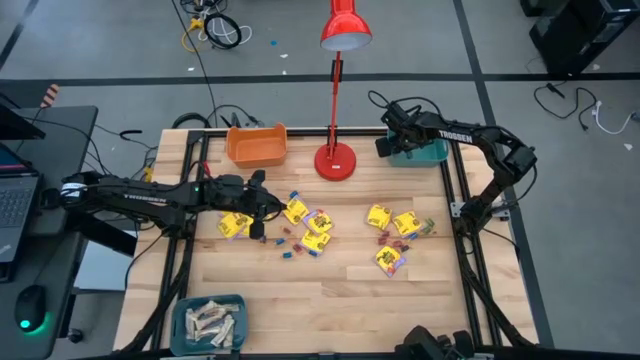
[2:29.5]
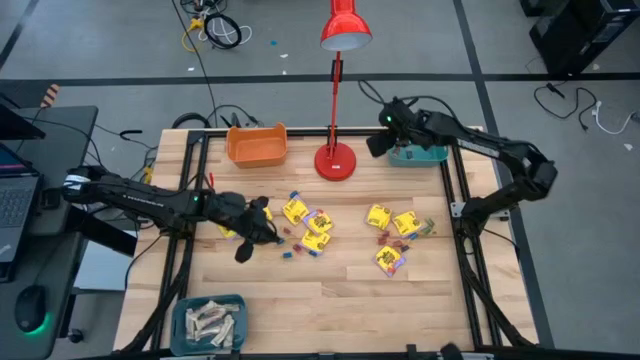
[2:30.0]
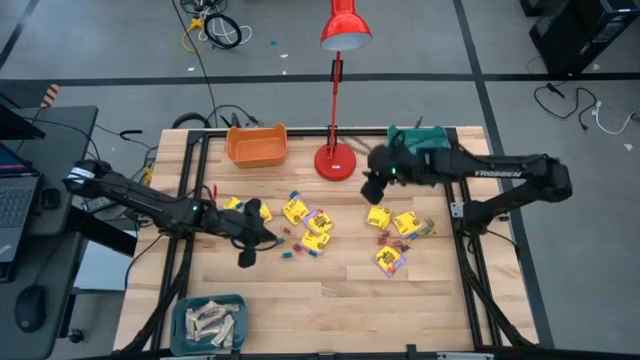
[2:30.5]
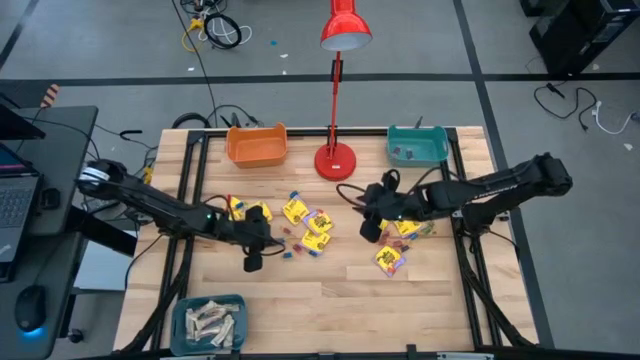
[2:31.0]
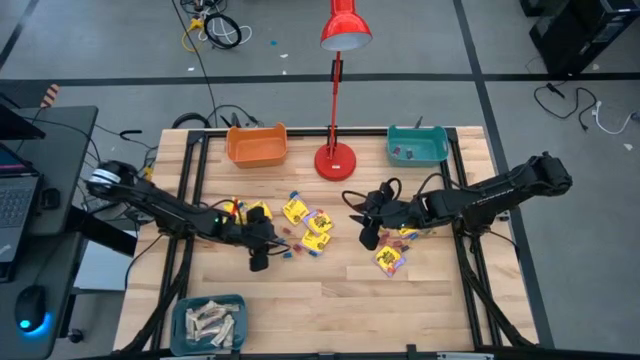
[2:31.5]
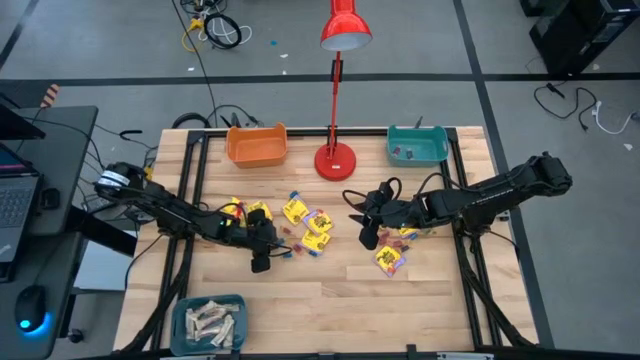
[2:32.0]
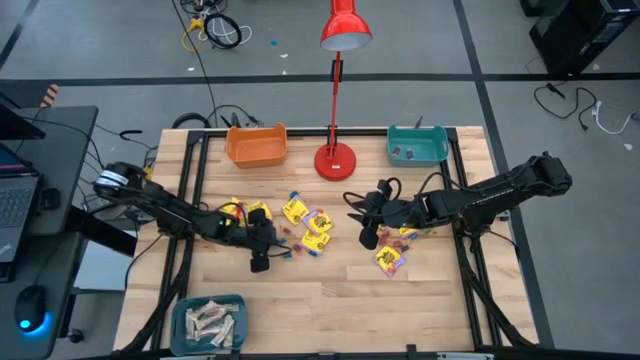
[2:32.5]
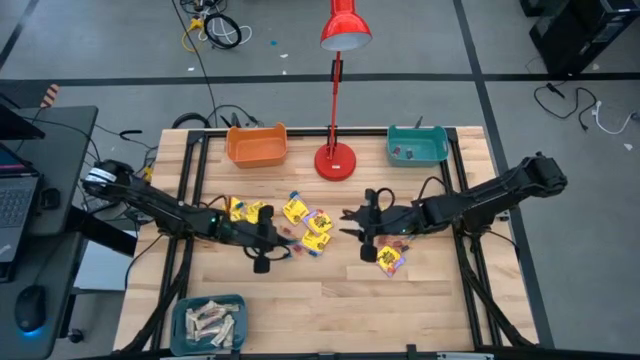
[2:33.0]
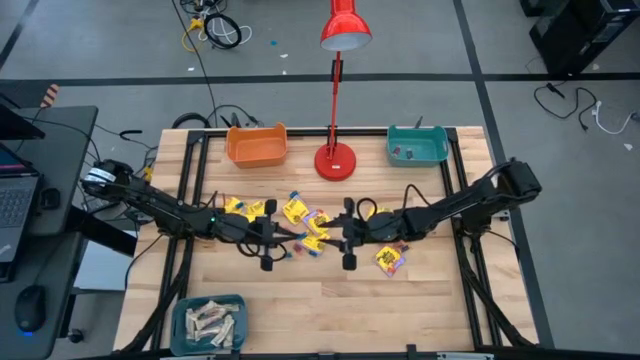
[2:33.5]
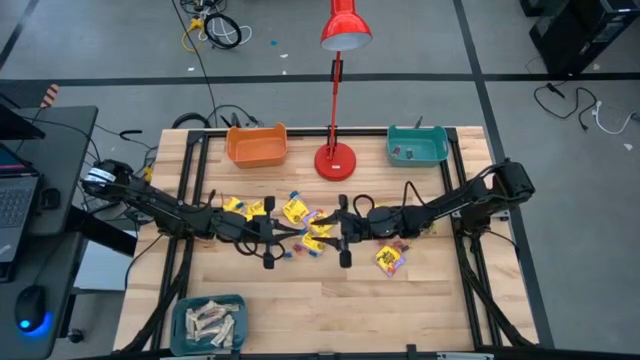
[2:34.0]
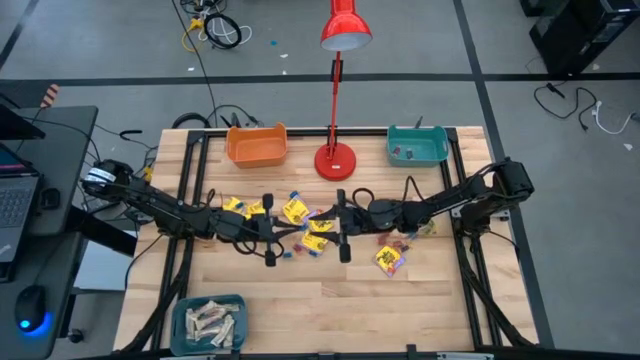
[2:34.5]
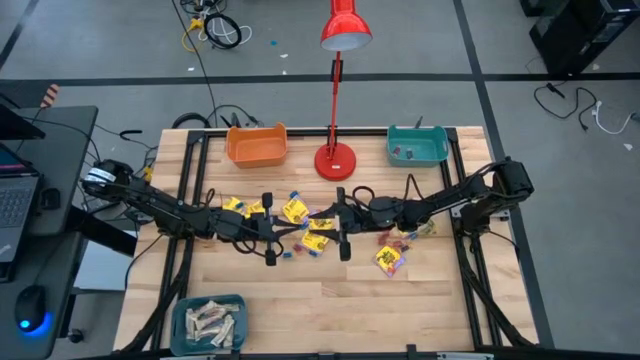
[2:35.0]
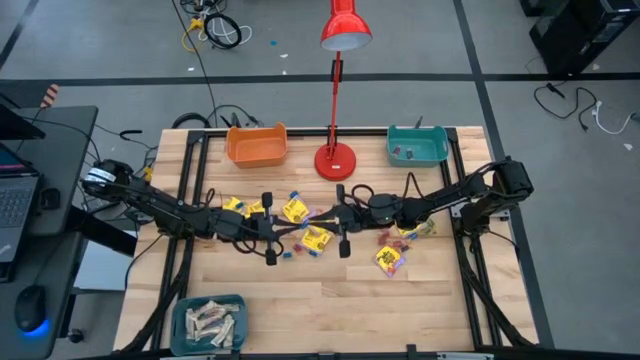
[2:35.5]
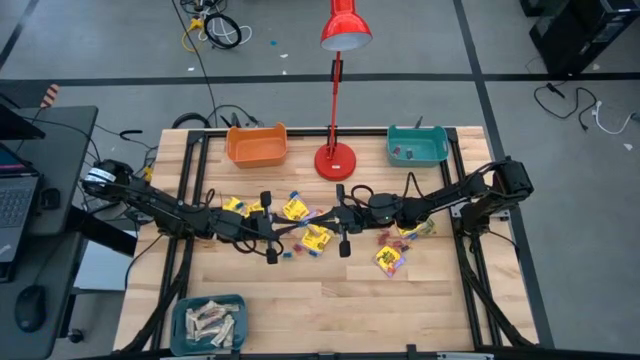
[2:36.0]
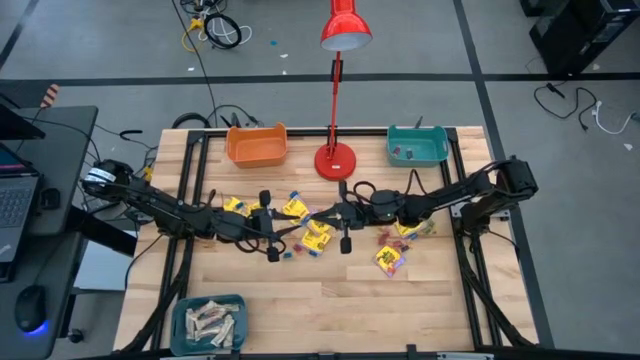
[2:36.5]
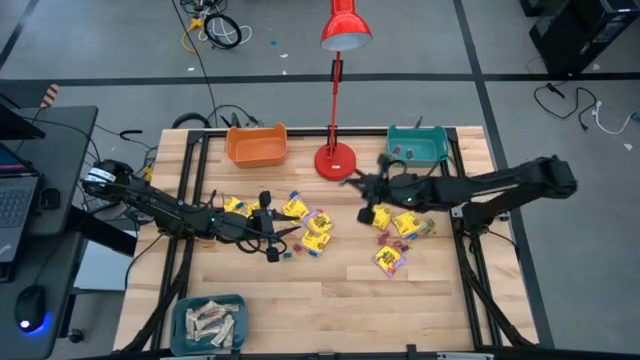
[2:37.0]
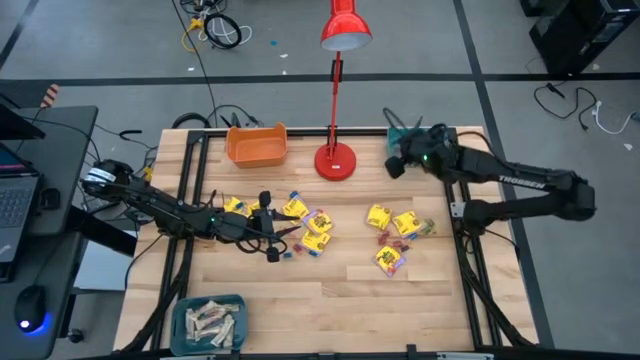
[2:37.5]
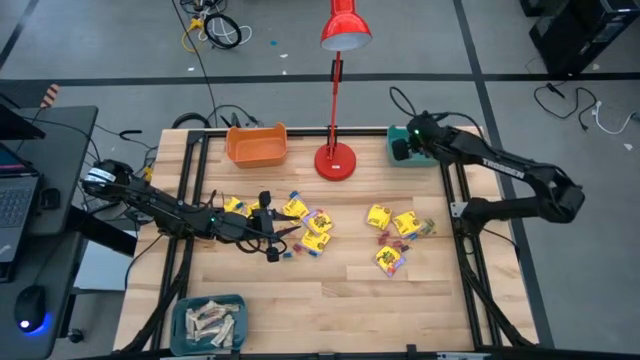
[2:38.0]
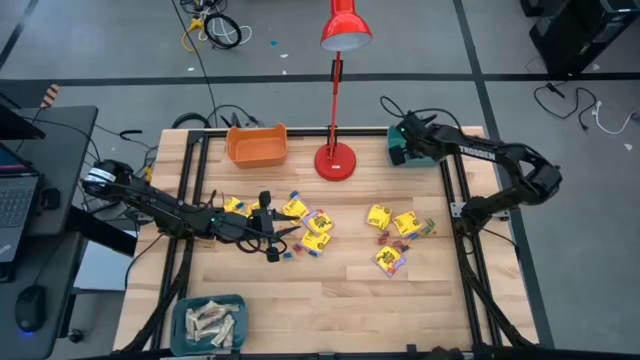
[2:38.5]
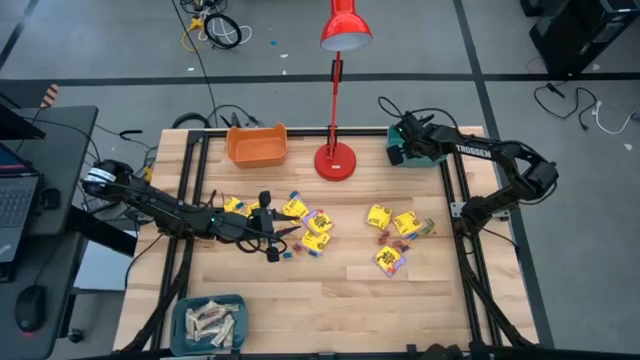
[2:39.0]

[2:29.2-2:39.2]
Task: Sort candy
Put the small blue candy into the green bin

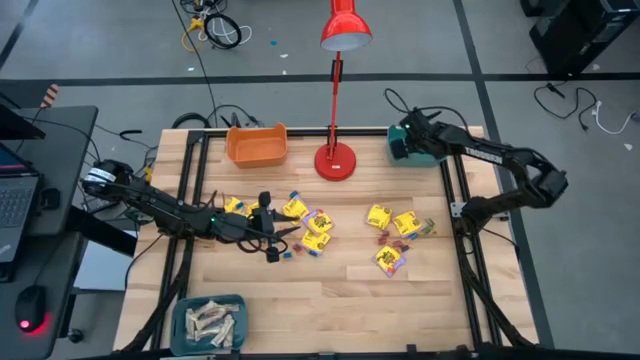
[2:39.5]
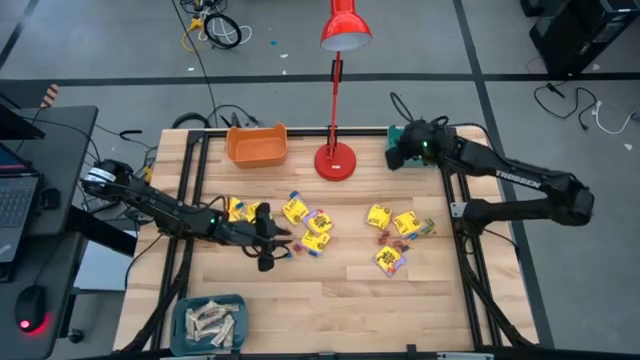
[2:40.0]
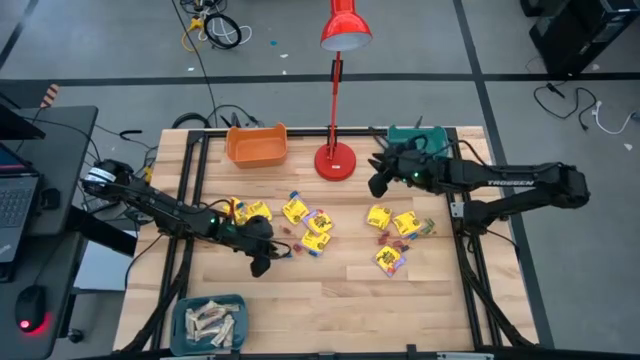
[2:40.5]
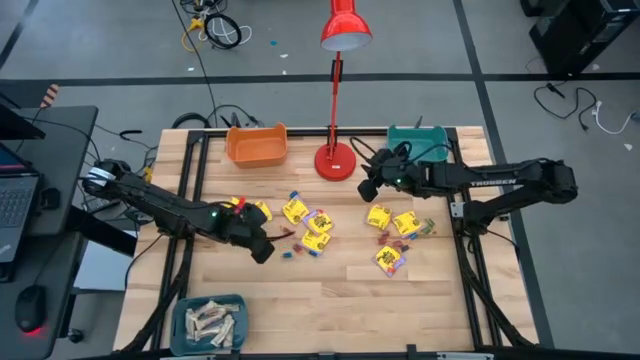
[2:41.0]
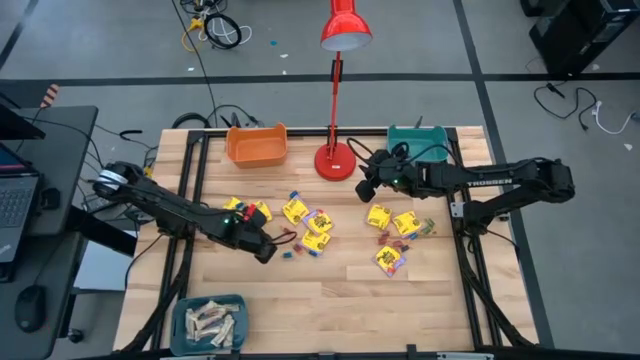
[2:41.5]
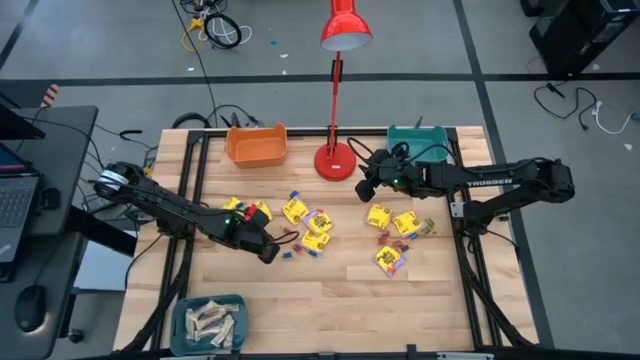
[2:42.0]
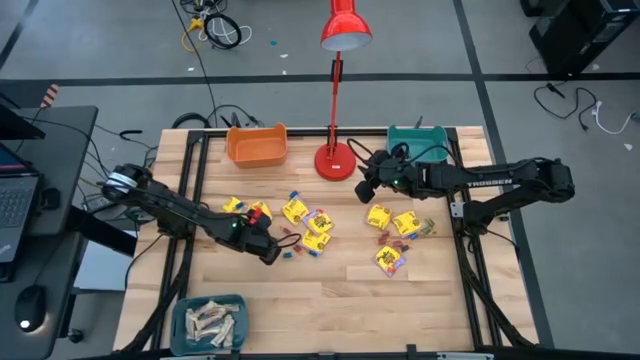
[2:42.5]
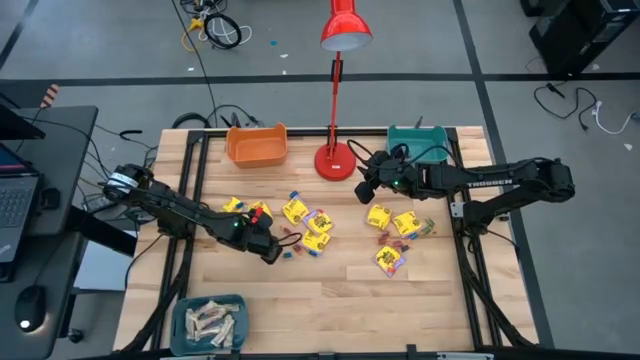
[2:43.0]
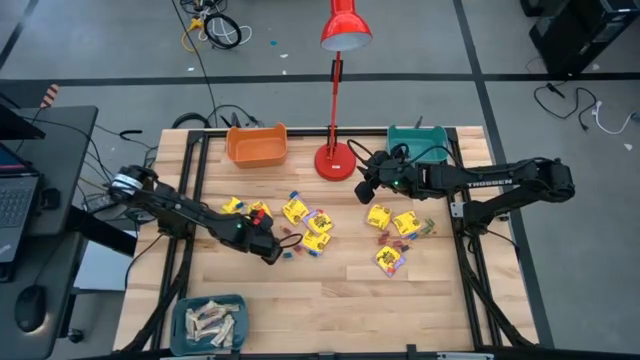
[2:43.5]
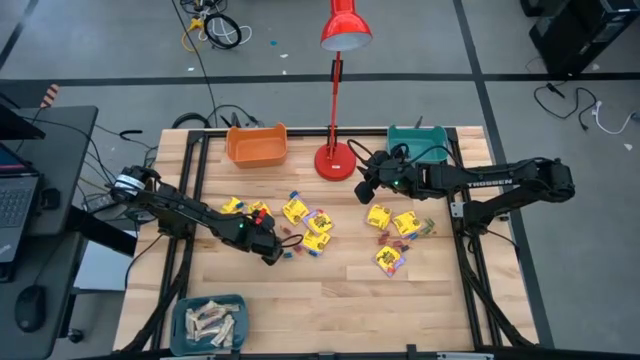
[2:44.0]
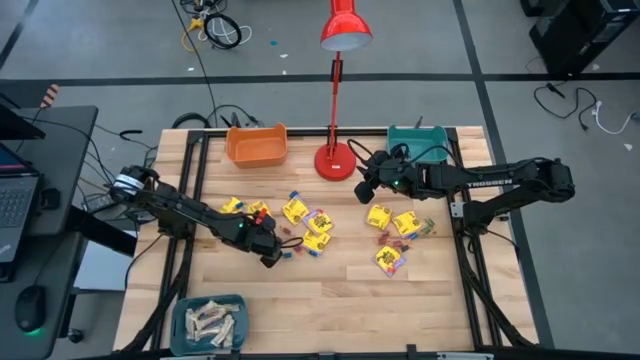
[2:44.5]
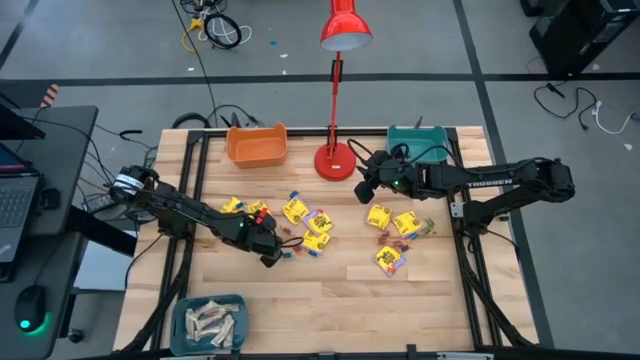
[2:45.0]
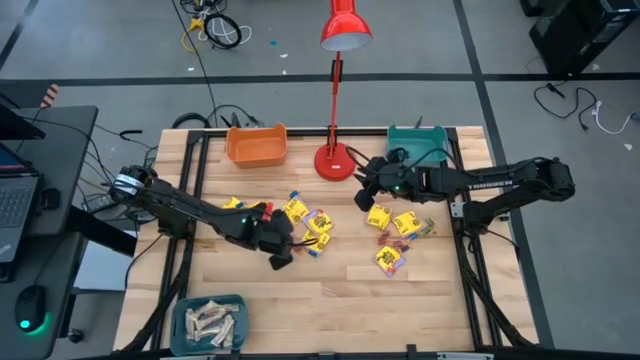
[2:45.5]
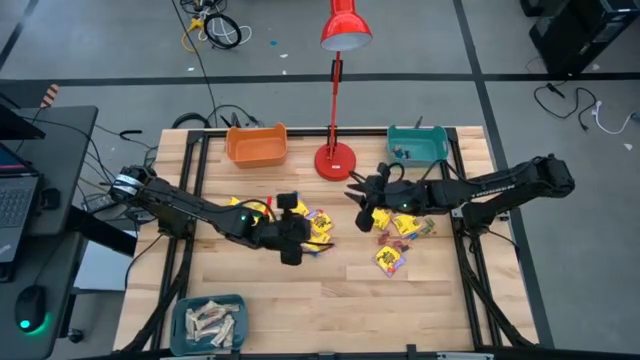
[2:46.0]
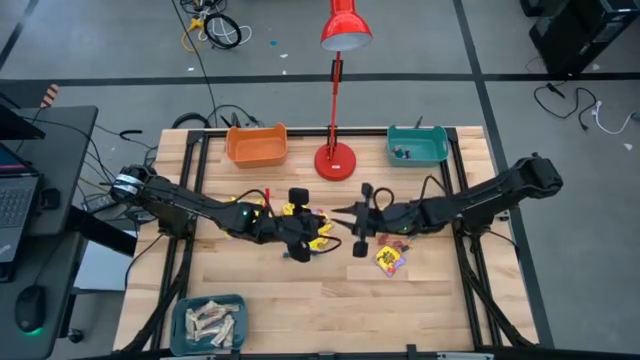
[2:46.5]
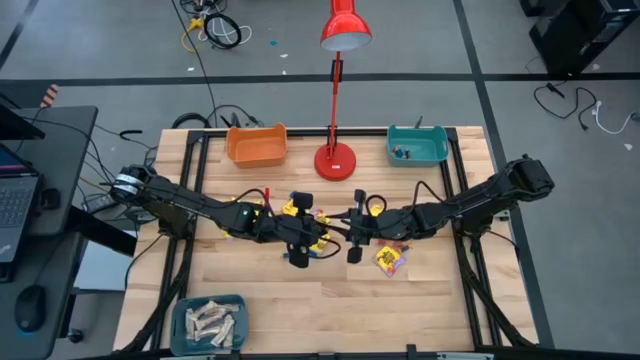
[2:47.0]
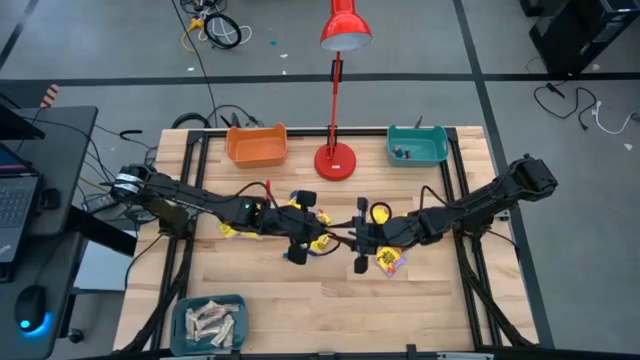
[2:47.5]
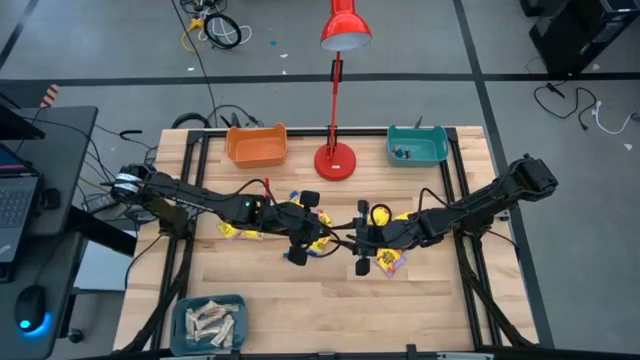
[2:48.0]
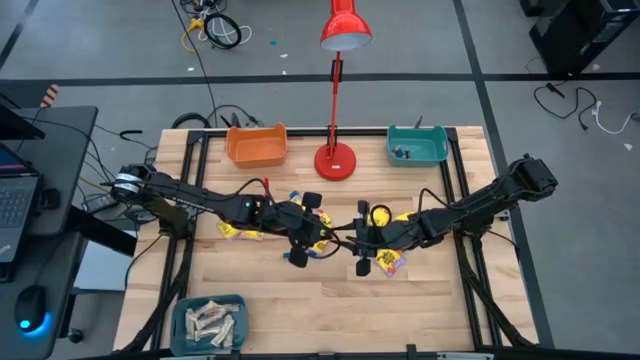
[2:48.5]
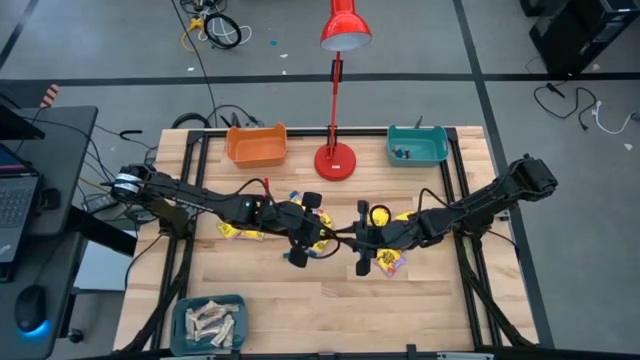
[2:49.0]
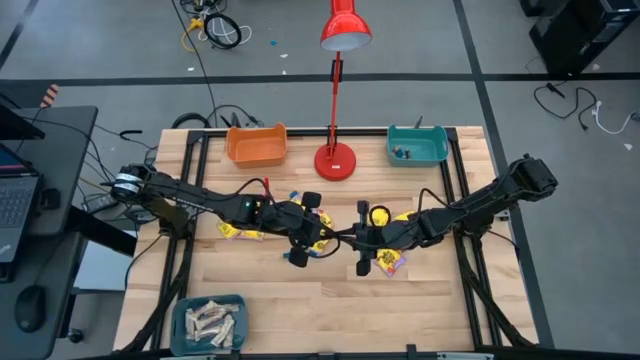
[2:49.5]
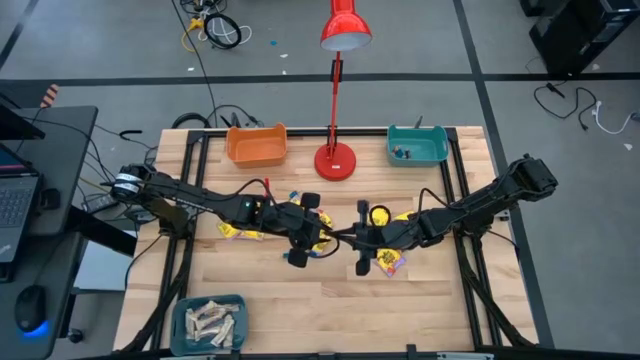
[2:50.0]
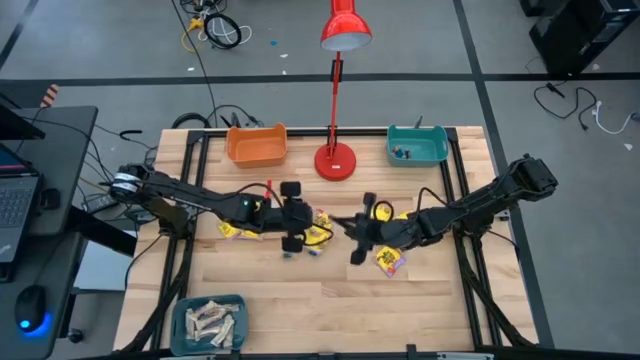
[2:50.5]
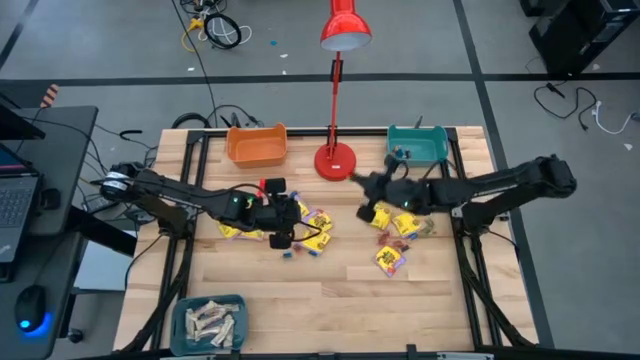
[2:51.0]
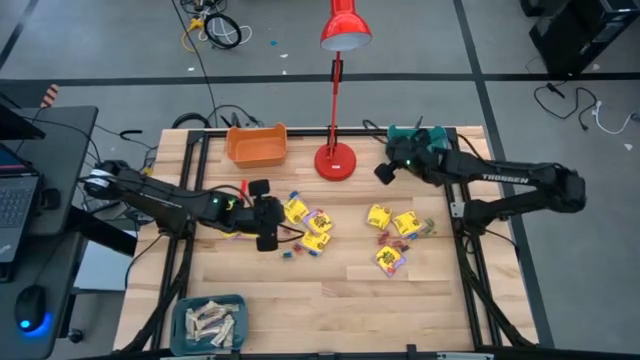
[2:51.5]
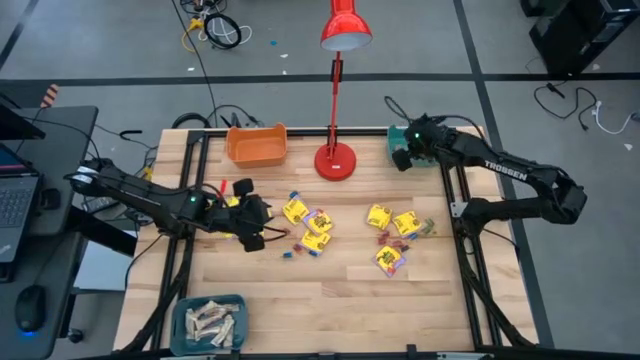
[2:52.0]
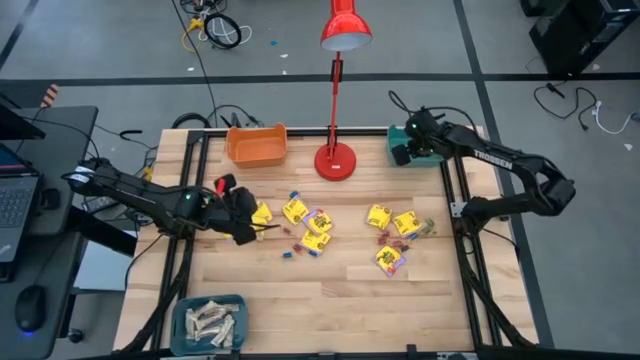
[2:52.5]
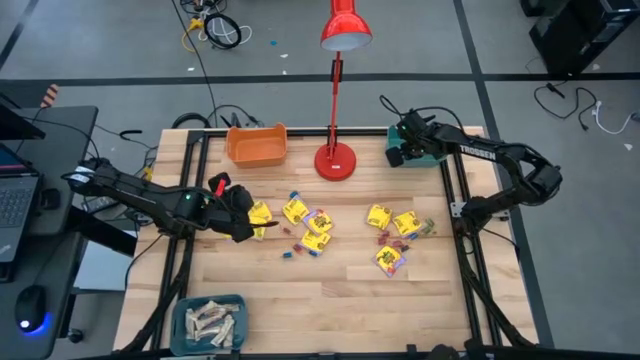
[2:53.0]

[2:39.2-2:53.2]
Put the small brown candy into the green bin
